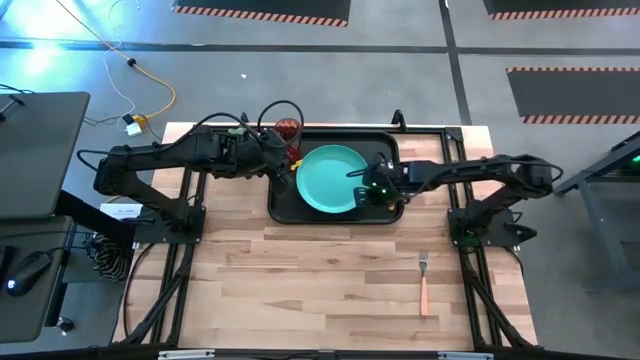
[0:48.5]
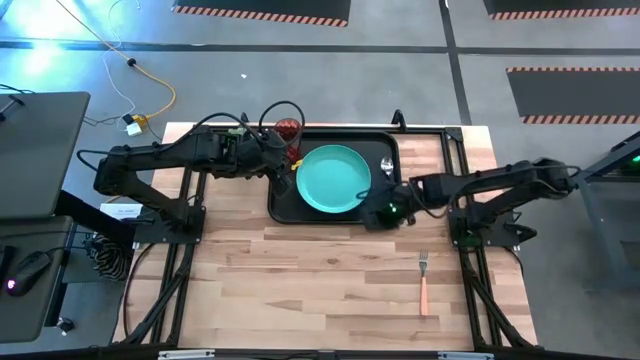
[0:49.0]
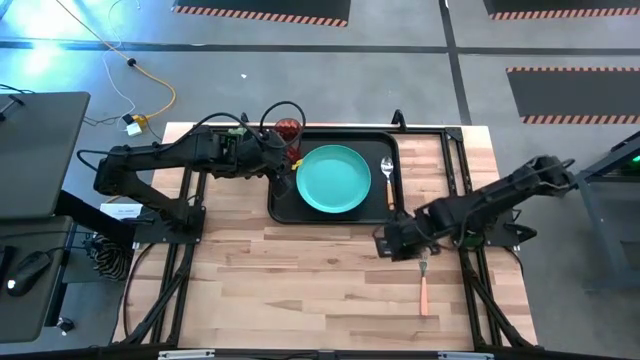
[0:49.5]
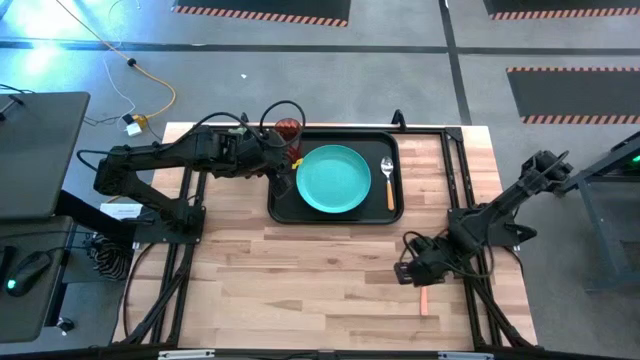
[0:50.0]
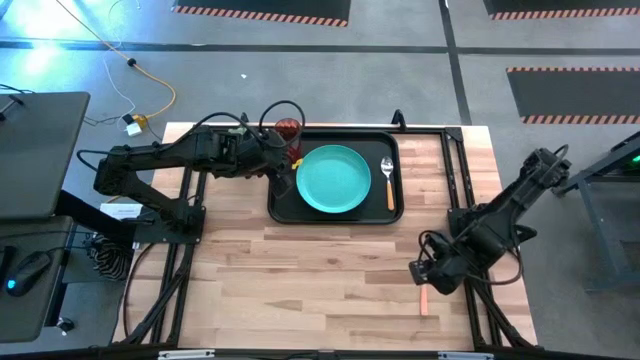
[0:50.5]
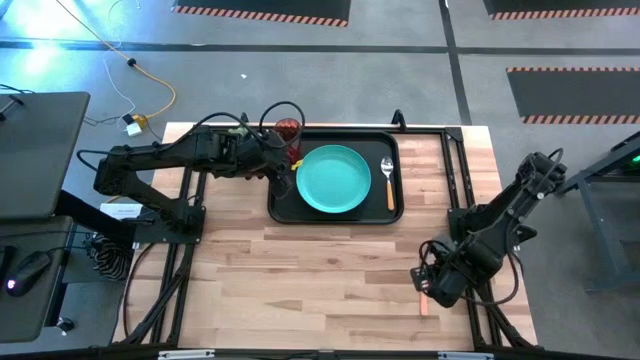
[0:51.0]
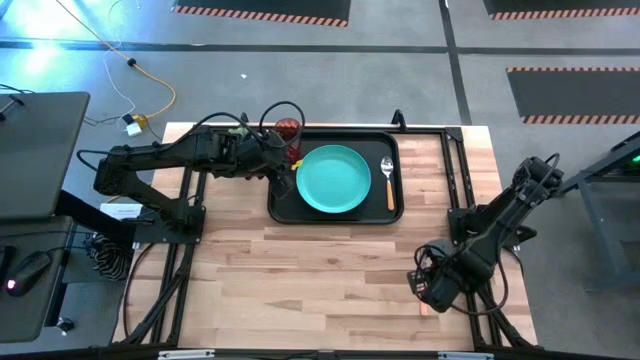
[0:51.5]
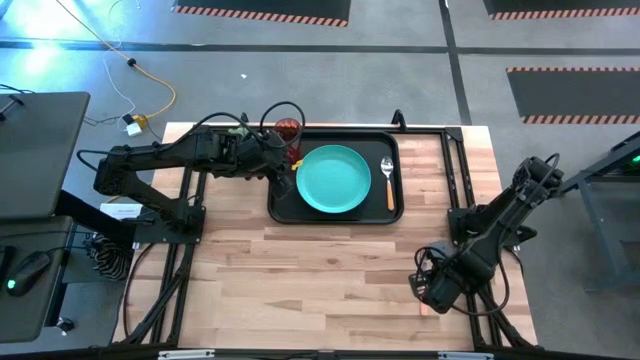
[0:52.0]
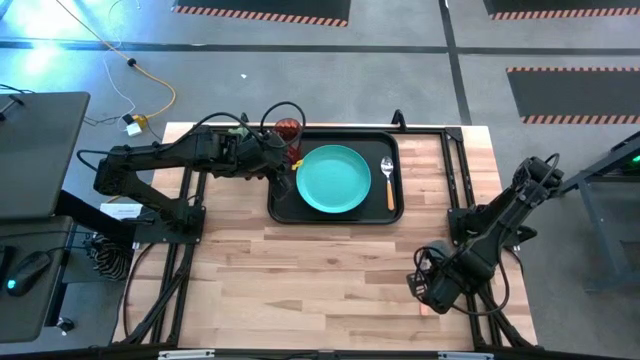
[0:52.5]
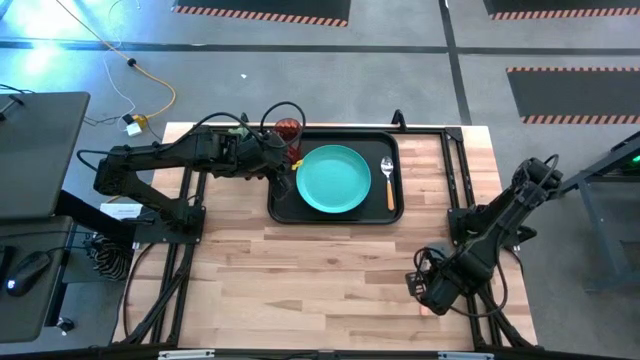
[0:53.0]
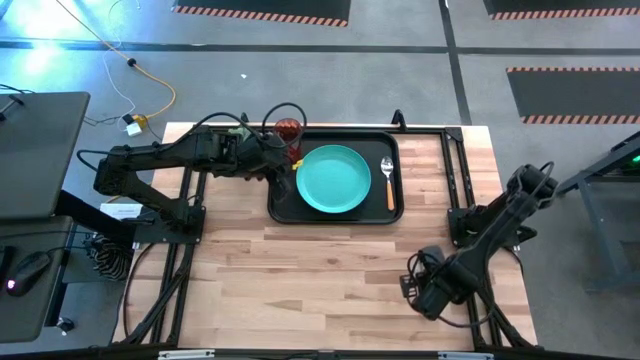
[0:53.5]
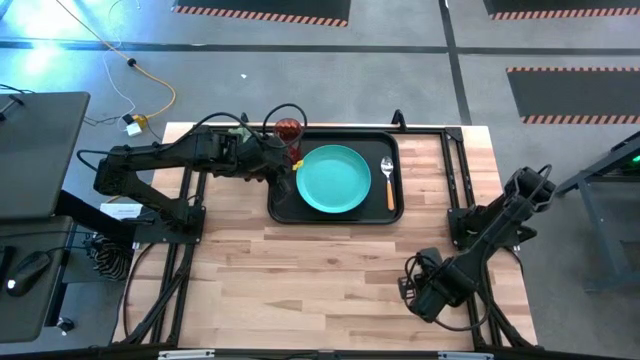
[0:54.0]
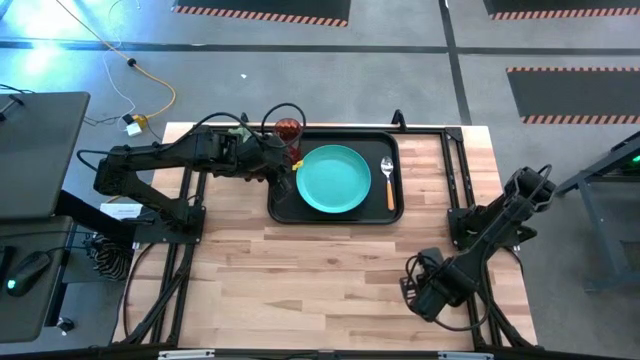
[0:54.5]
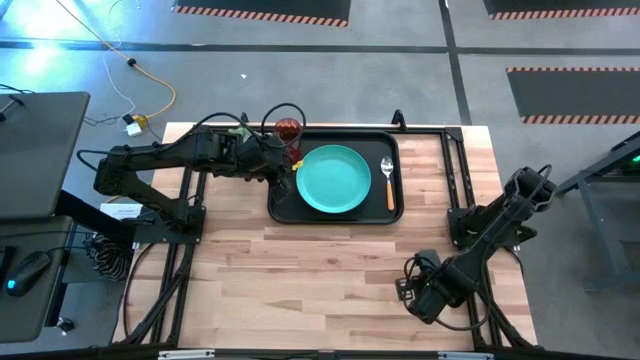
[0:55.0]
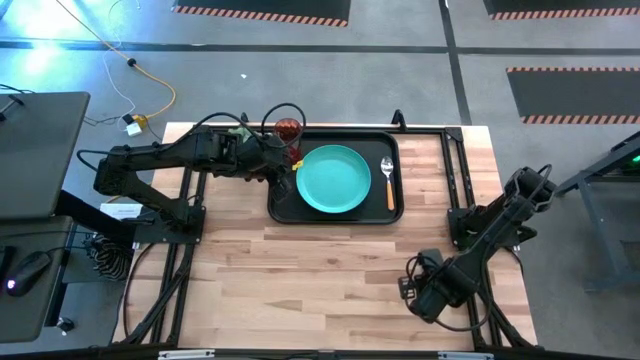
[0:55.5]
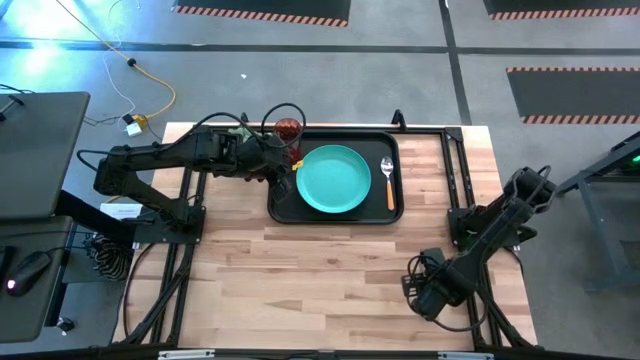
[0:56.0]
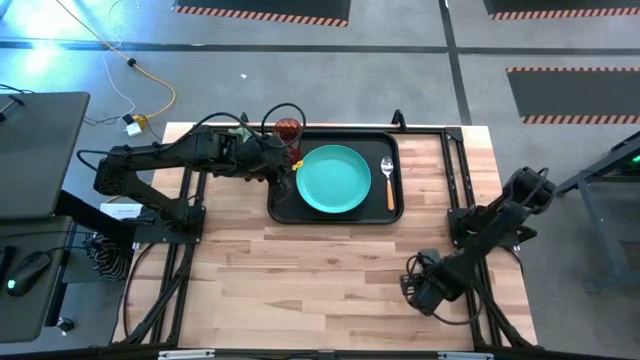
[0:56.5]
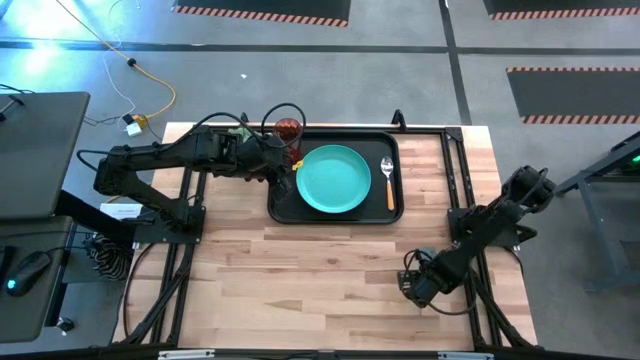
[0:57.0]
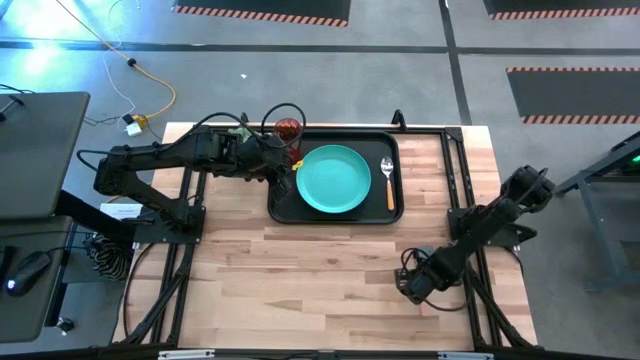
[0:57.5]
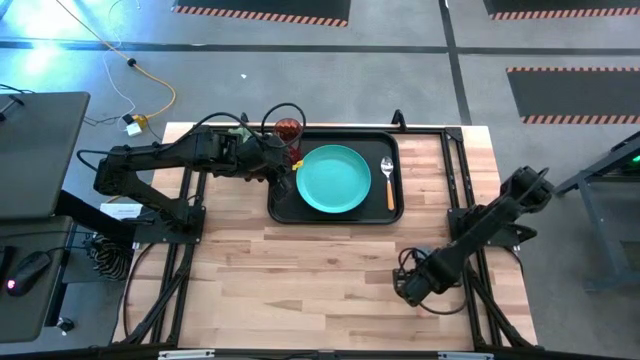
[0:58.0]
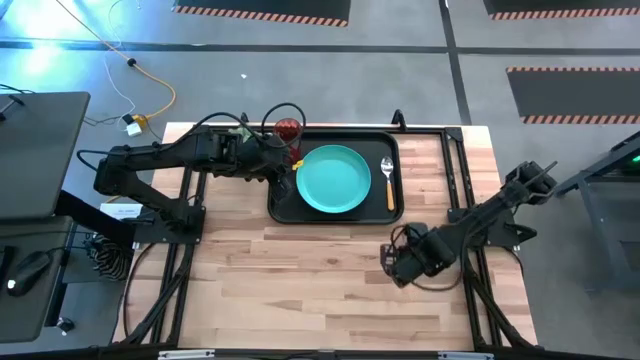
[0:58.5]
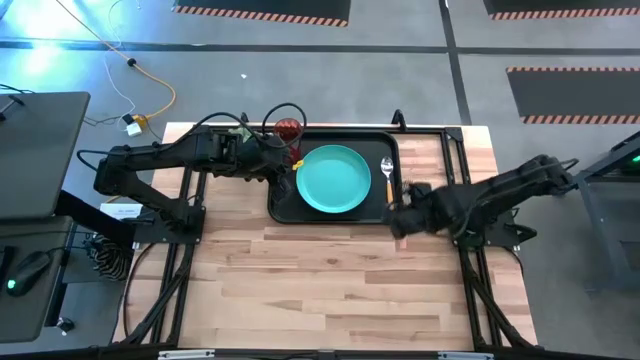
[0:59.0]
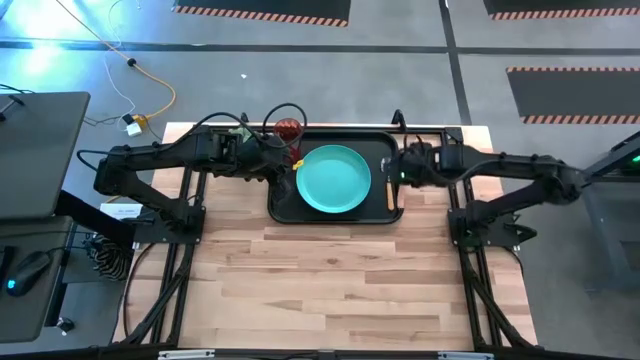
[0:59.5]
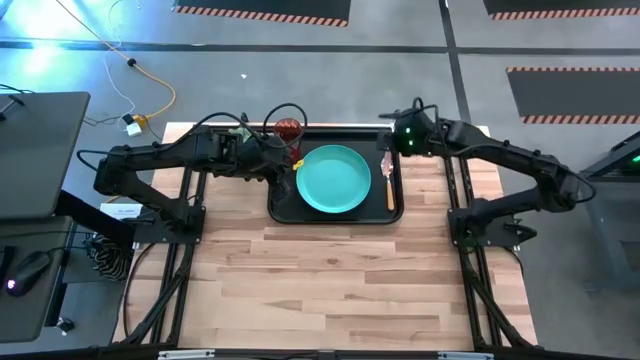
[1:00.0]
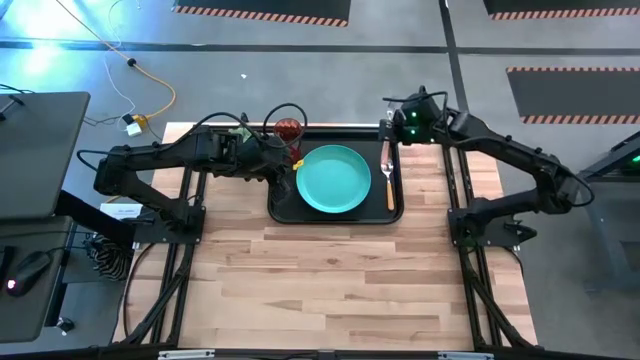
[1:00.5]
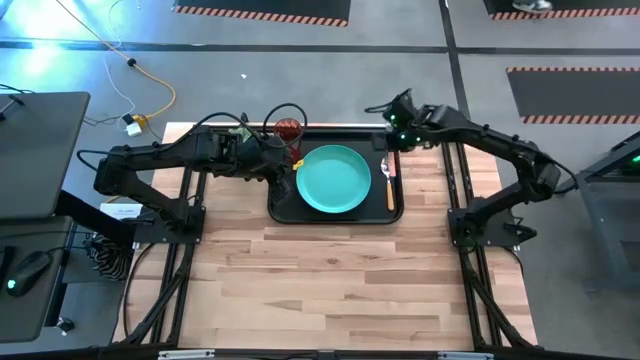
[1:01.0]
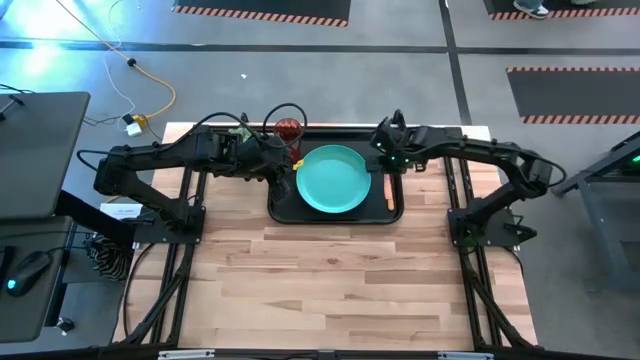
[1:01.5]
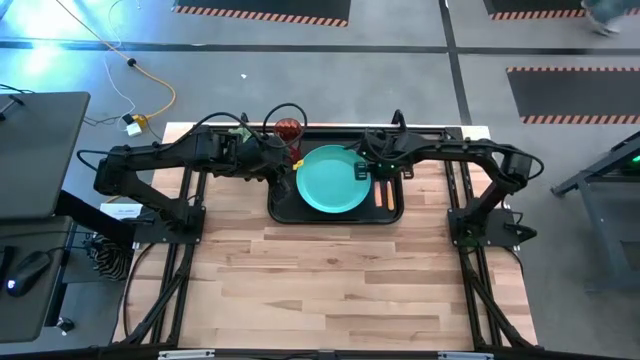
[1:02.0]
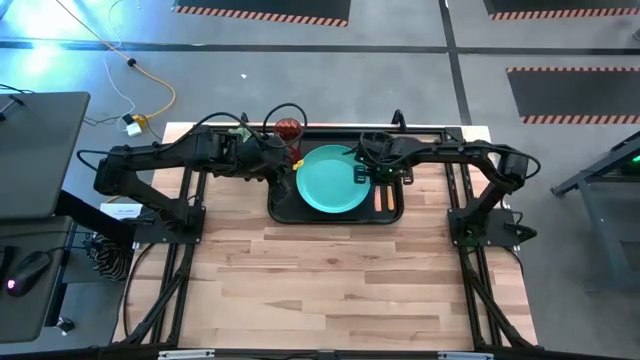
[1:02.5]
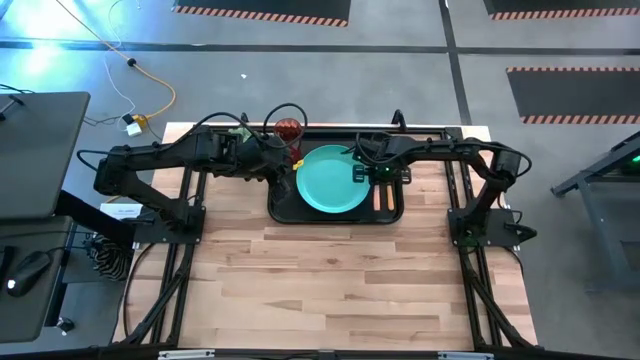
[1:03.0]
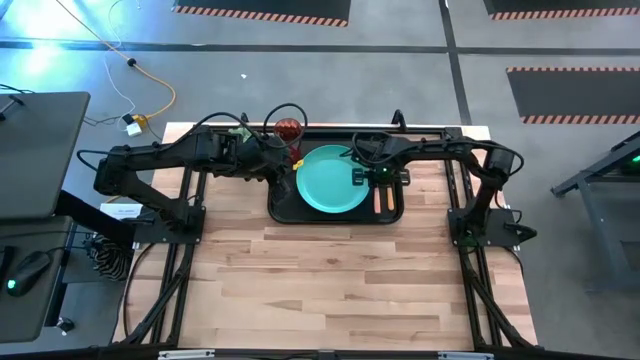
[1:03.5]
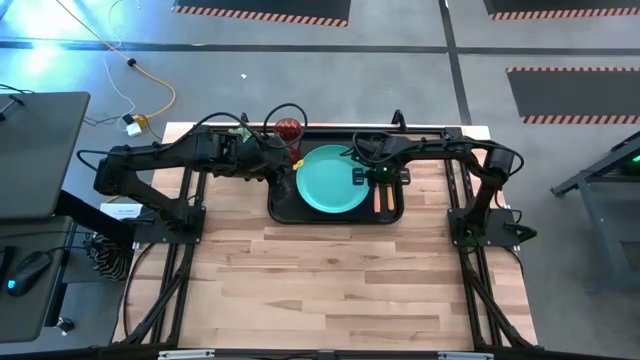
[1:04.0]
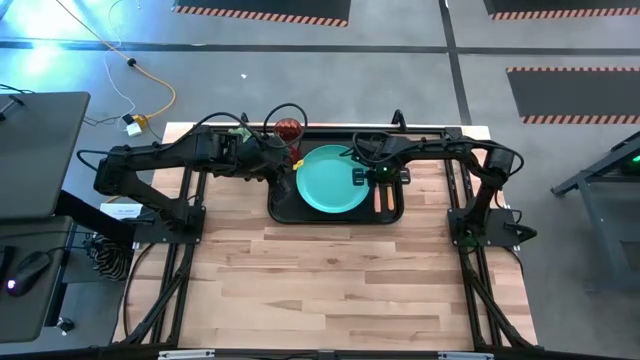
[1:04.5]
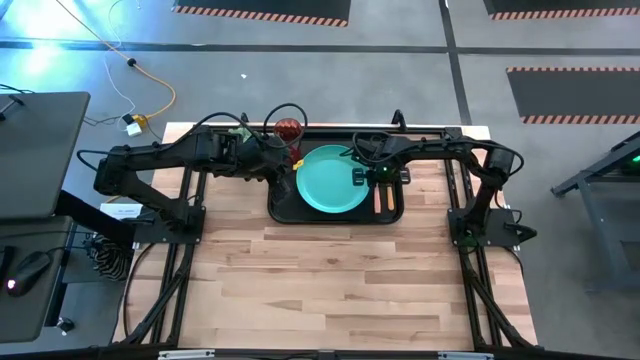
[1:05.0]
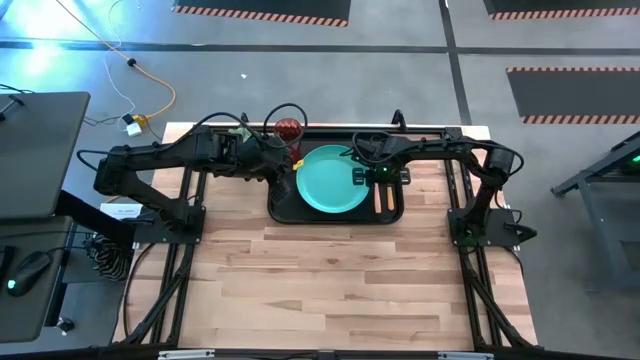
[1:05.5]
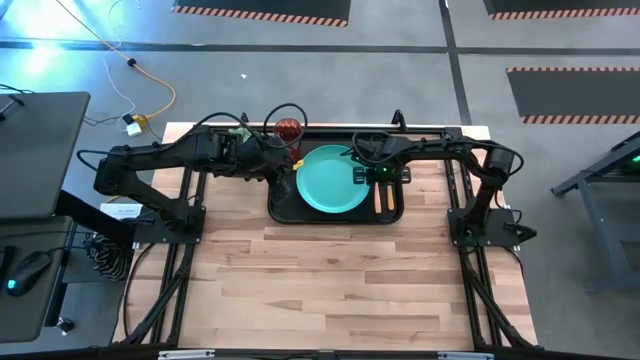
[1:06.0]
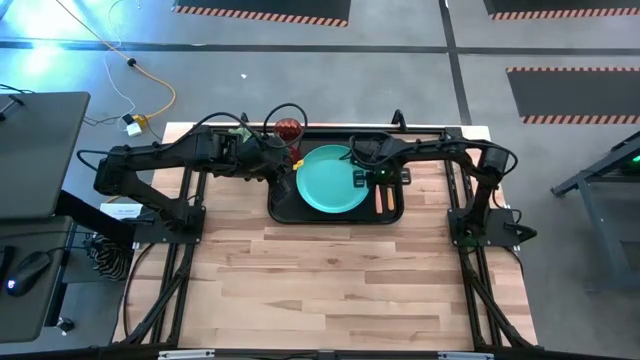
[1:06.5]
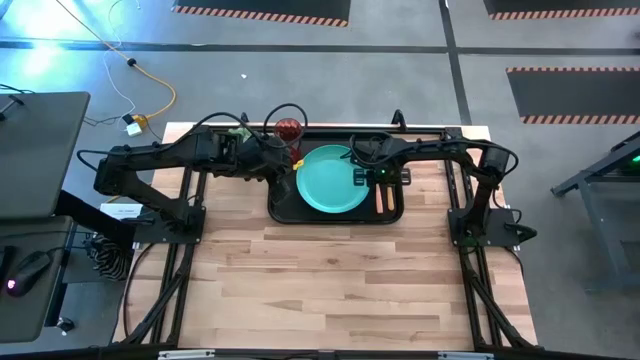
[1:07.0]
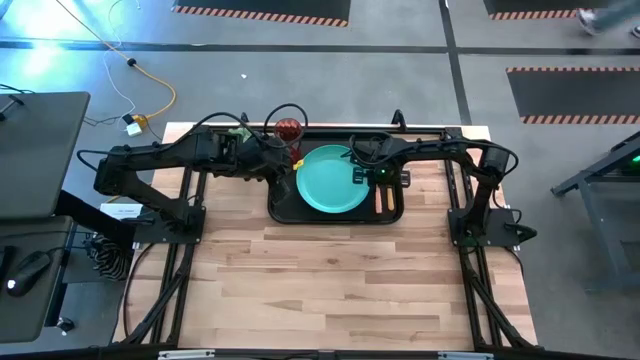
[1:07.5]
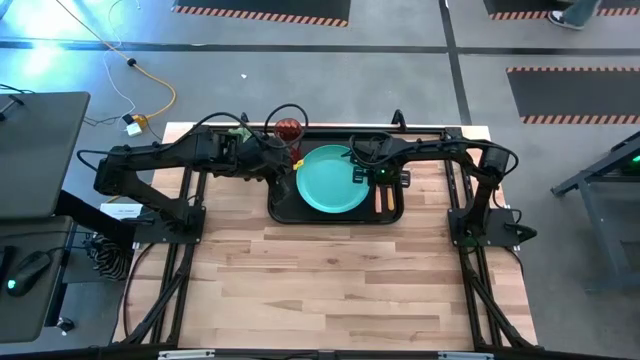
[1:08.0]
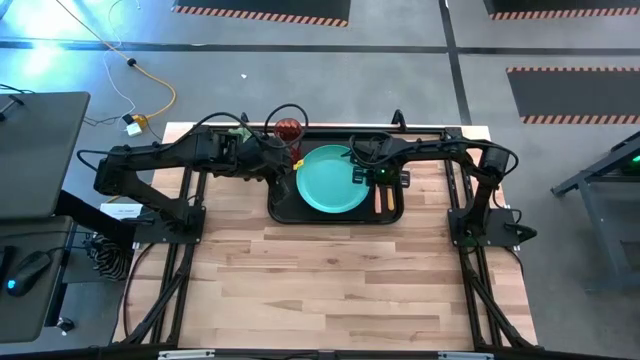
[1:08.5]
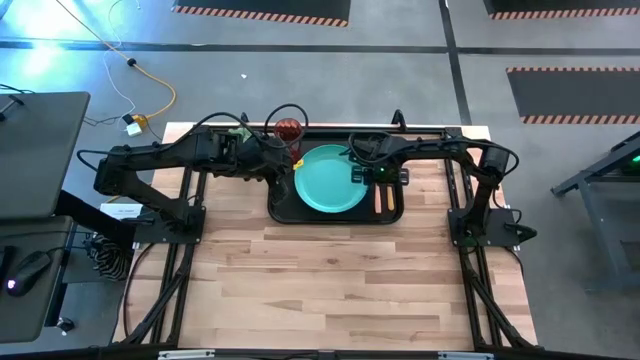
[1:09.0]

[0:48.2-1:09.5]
Task: Pick and place plate/cup/fork/spoon on tray
Put the yellow fork on the black tray
